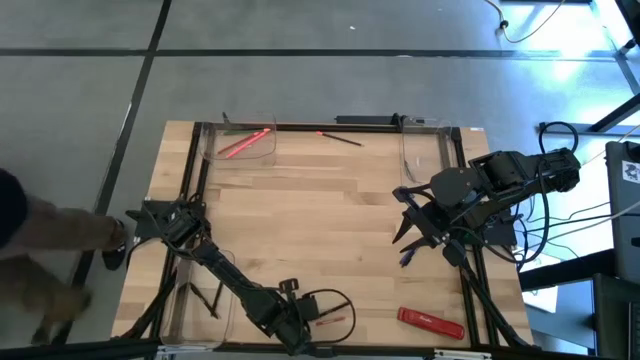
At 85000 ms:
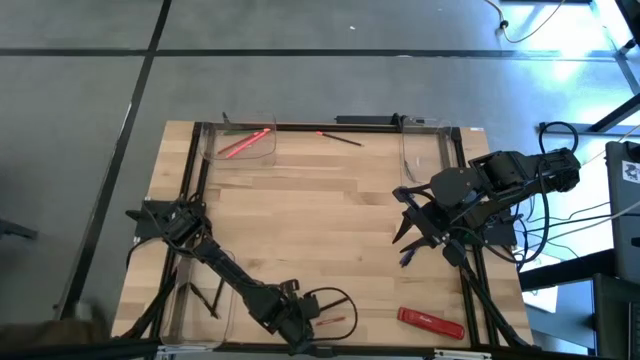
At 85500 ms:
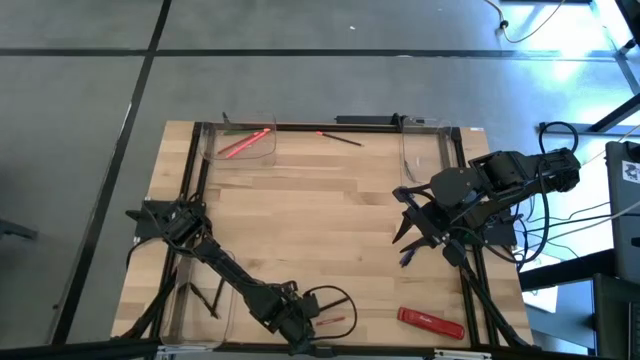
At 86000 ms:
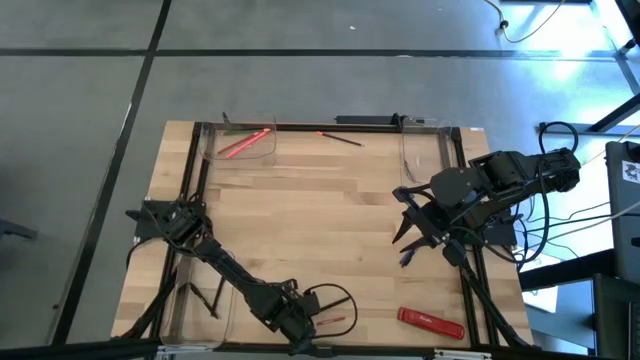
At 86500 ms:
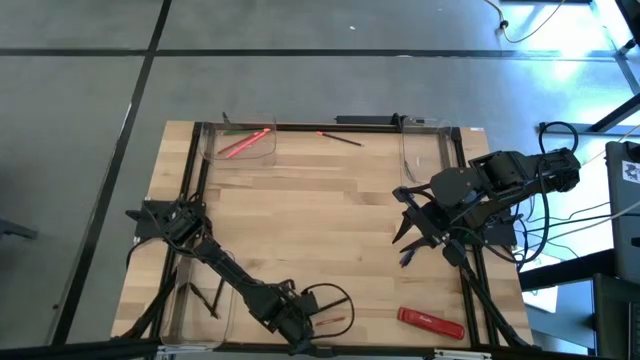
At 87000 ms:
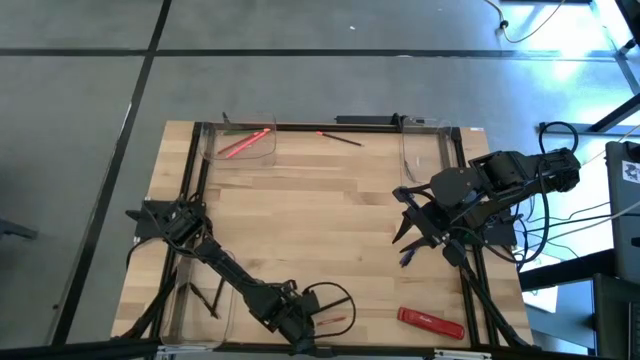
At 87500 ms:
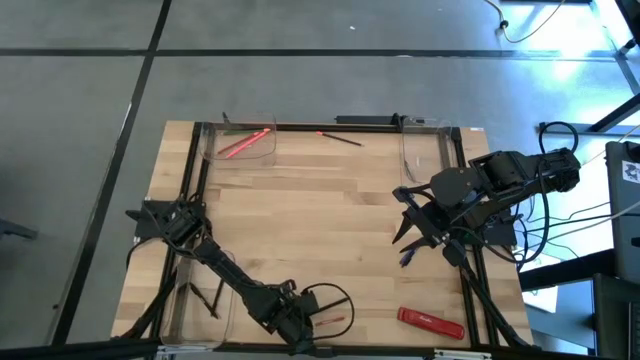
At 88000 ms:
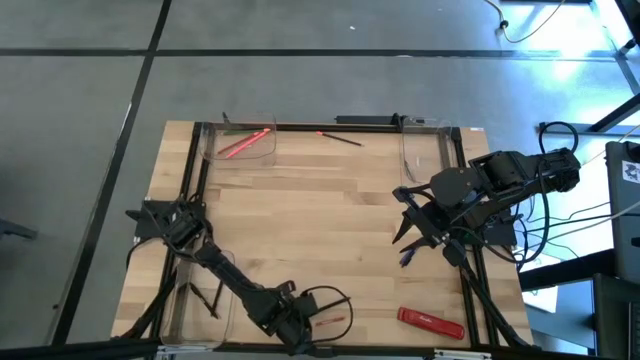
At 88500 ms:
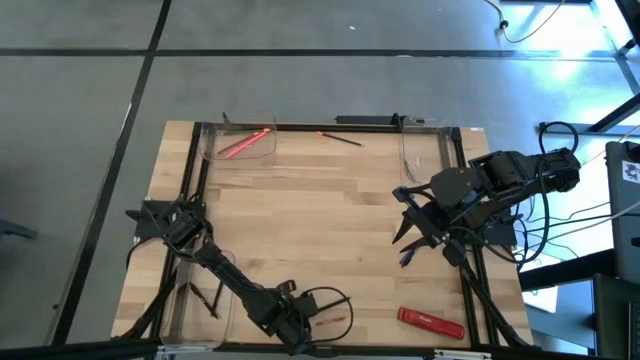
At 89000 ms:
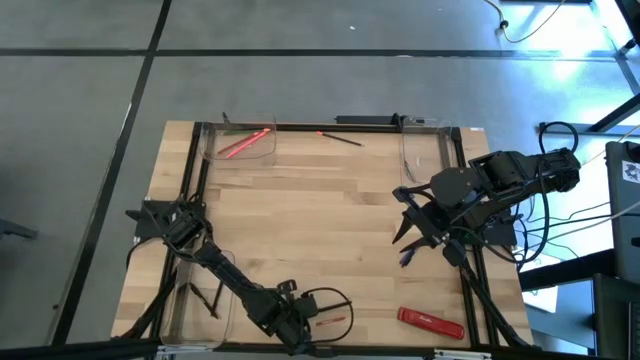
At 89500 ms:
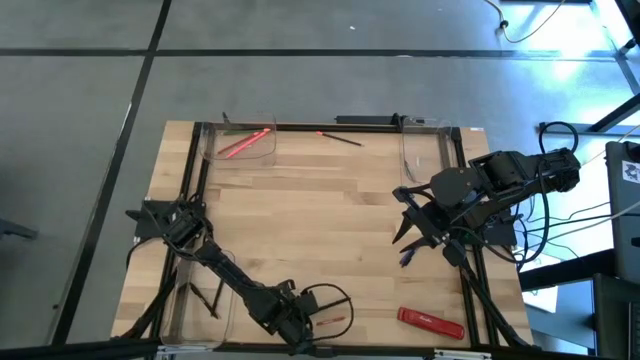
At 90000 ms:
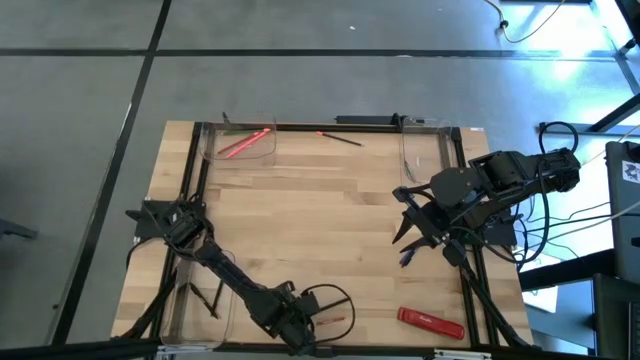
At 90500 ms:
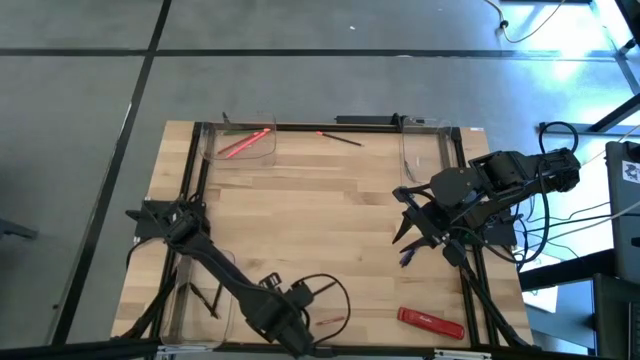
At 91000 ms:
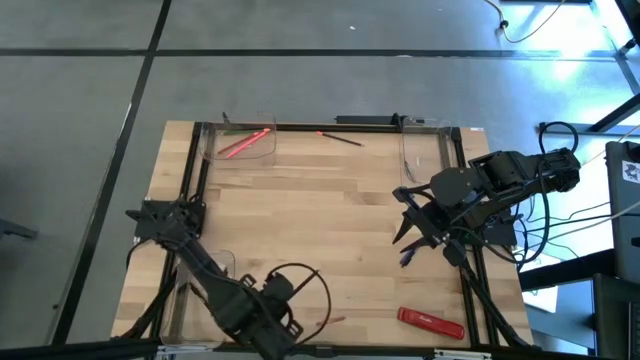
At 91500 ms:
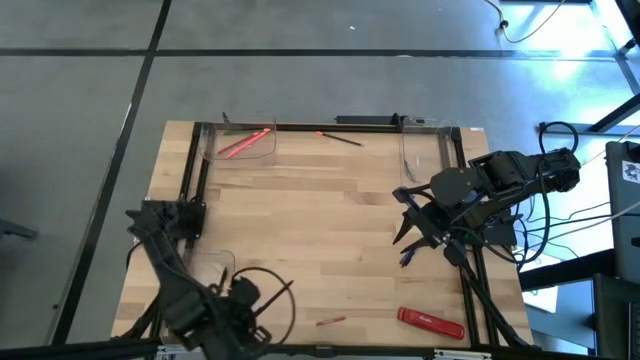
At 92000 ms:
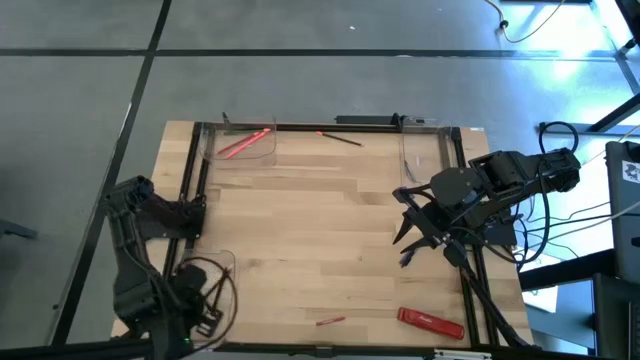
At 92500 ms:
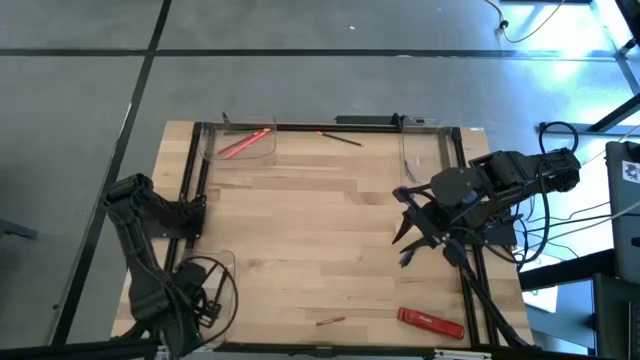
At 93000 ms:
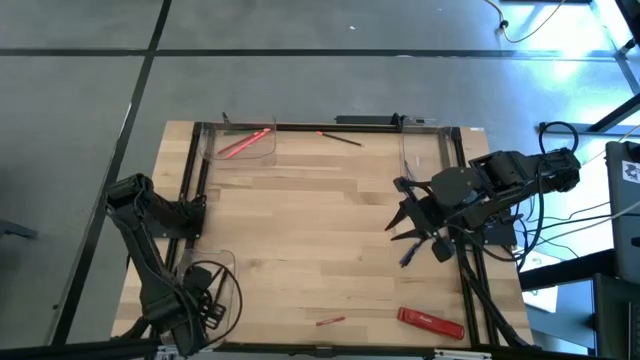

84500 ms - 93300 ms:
Task: Sort crayons/erasers/pens/pencils in bins
Put the black pen into the bottom left transparent bin

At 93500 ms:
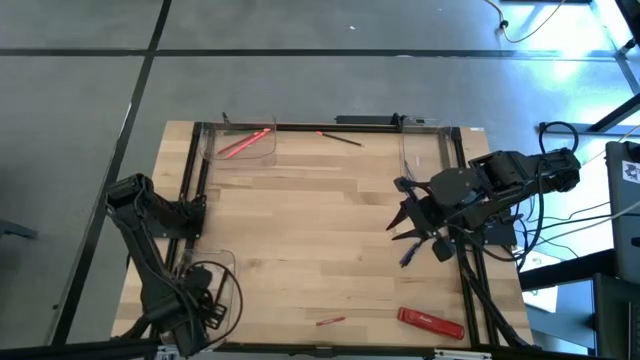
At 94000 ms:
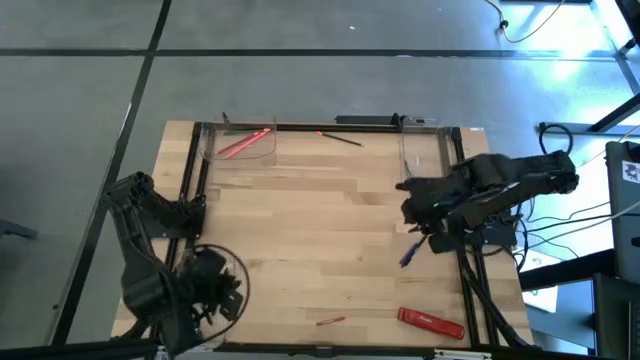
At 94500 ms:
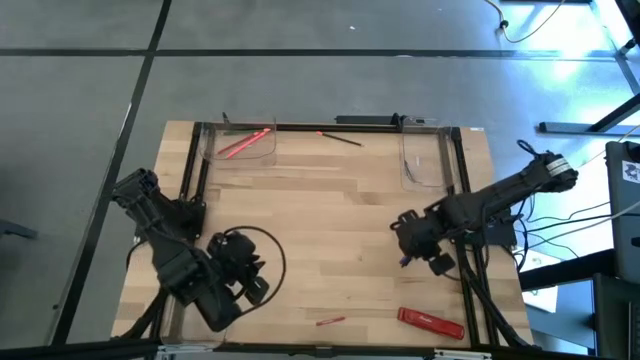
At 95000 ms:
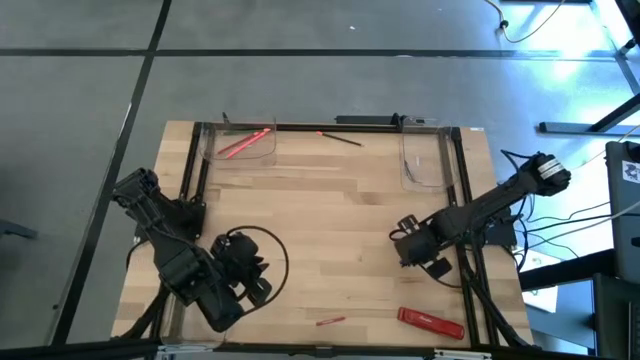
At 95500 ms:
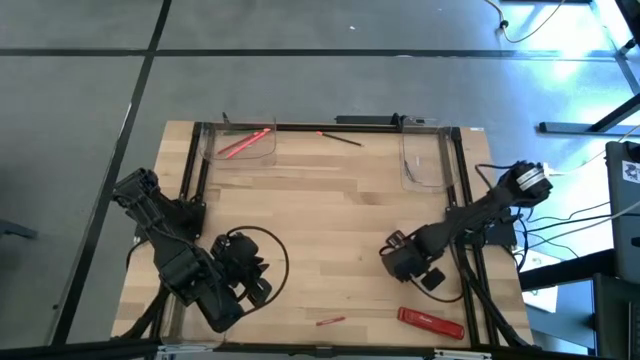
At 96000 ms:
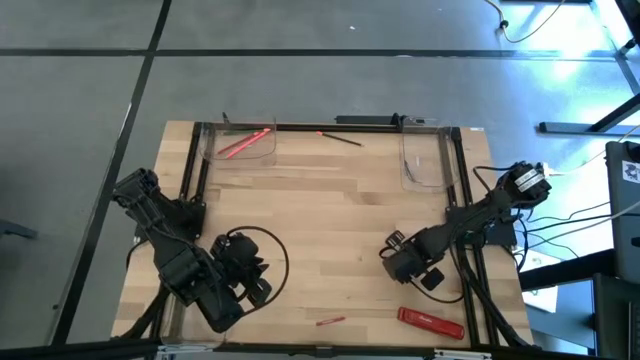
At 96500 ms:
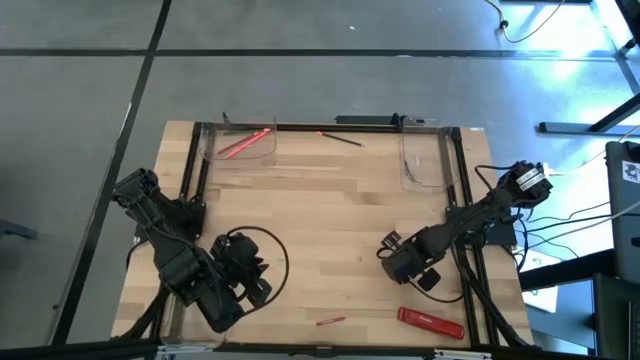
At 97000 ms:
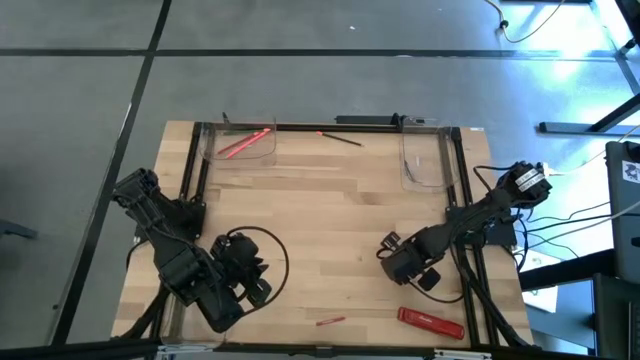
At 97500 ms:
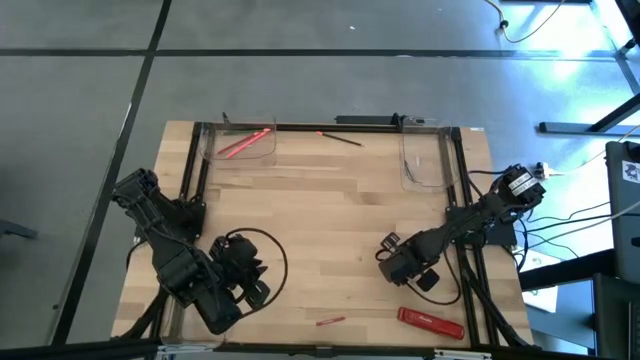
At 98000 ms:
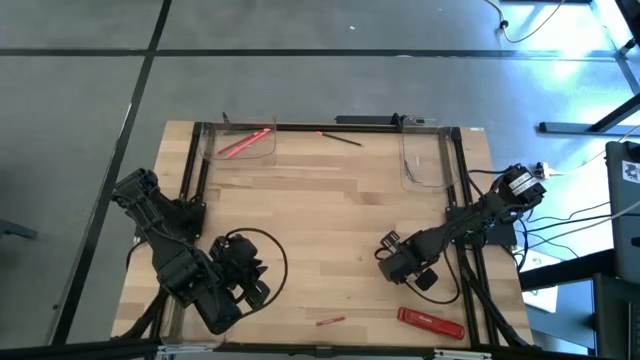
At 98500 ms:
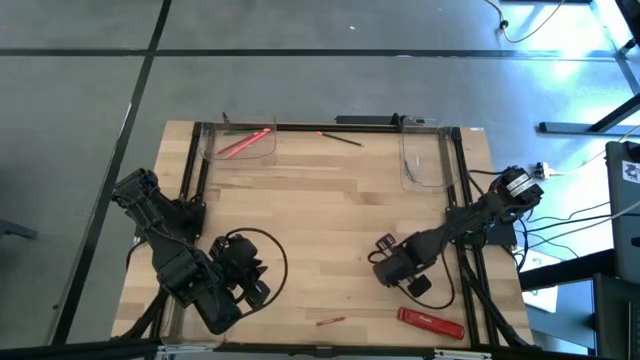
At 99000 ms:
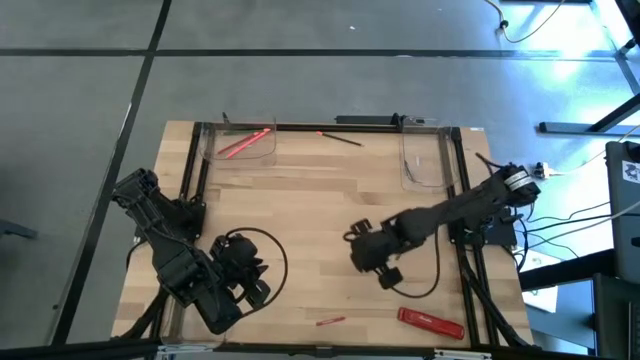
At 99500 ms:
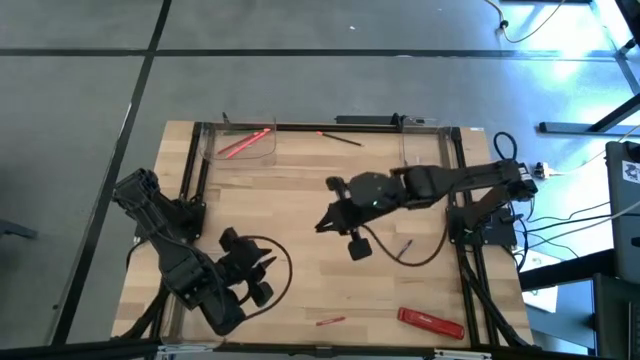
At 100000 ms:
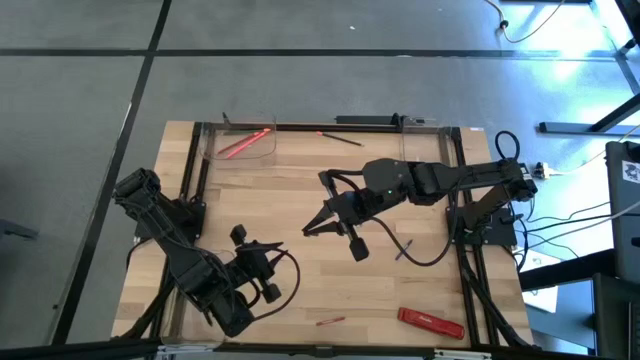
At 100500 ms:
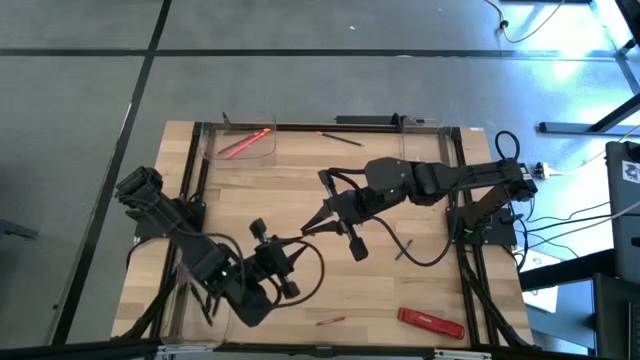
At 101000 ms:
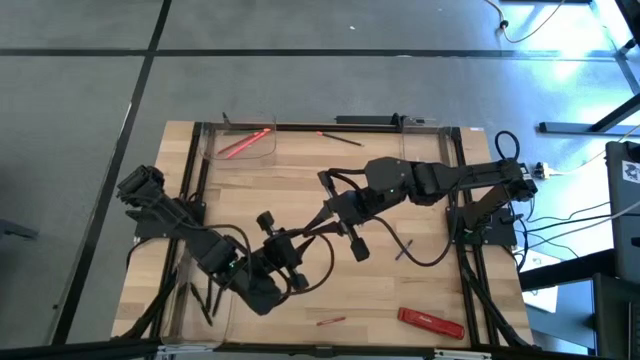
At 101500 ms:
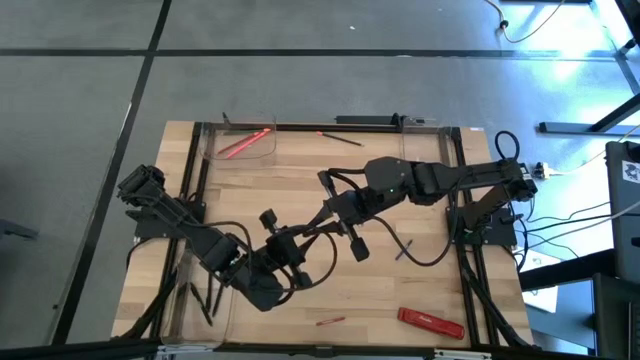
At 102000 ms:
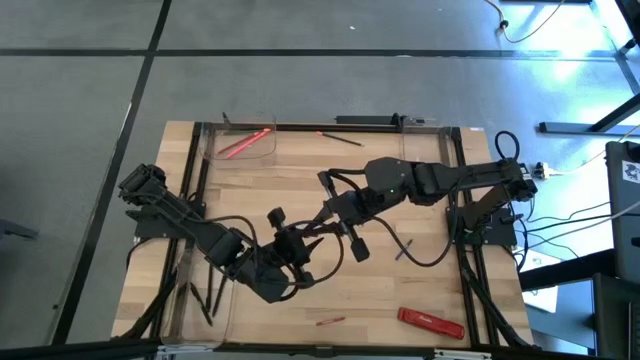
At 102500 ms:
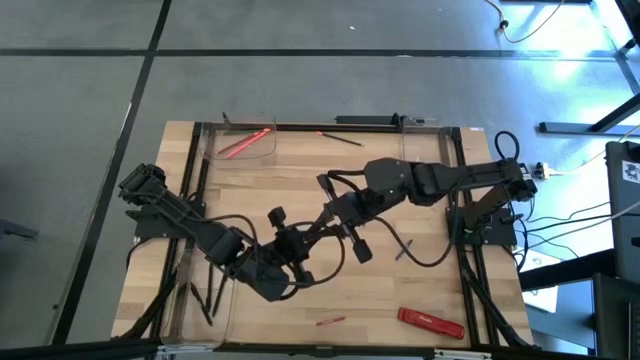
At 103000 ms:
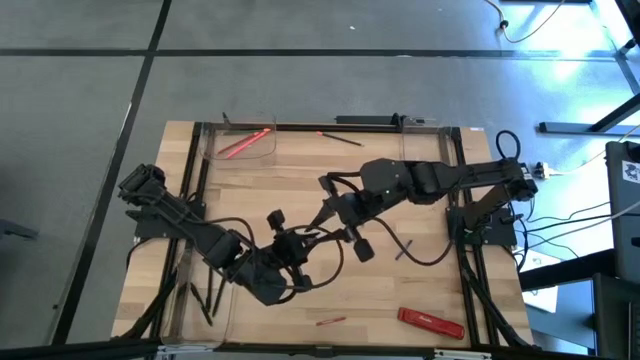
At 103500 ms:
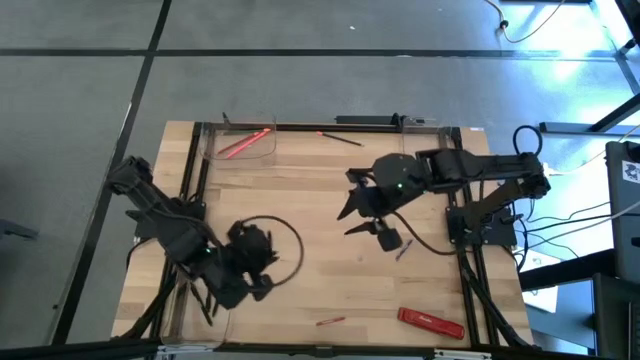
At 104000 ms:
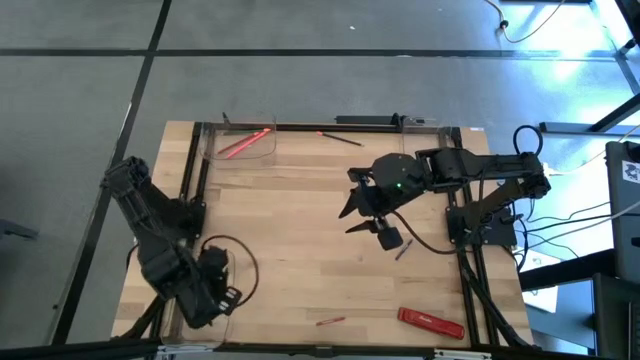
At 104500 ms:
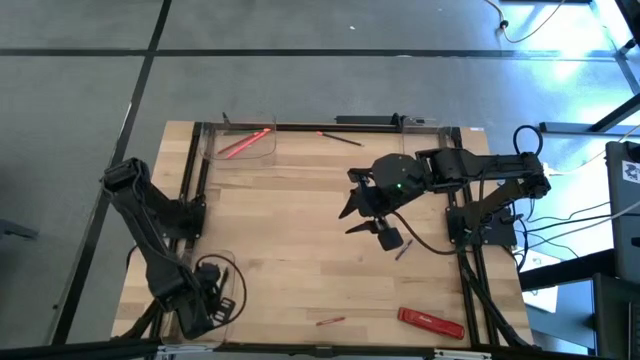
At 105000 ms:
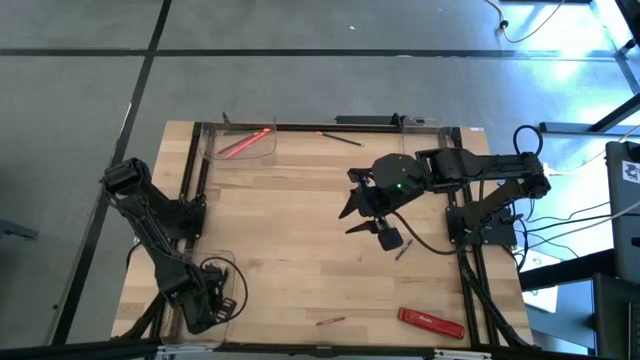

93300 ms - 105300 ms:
Put the black pen into the bottom left transparent bin
